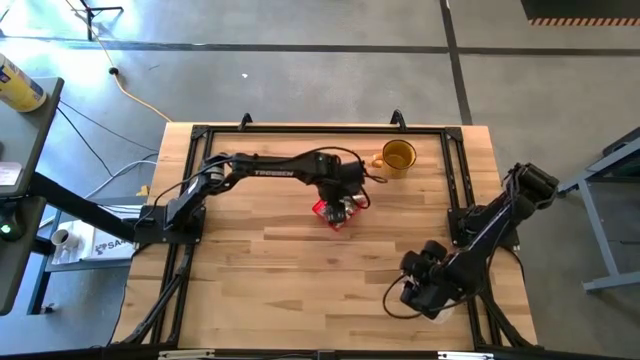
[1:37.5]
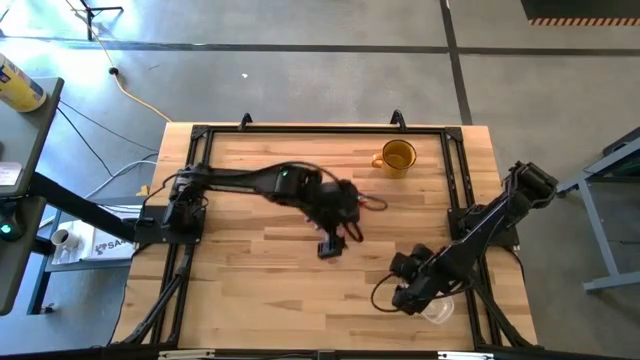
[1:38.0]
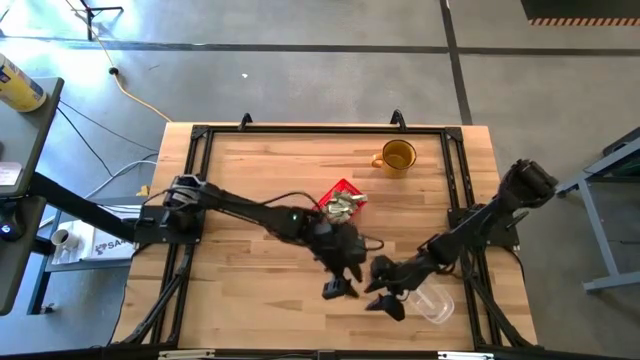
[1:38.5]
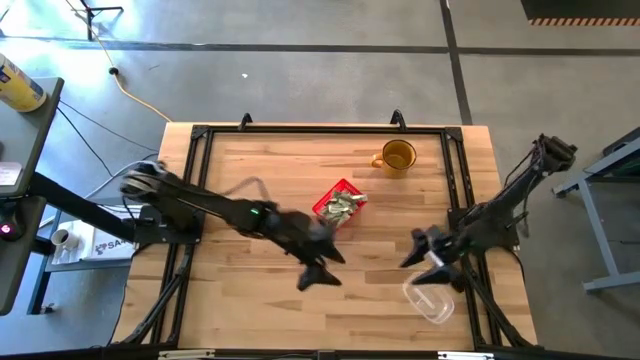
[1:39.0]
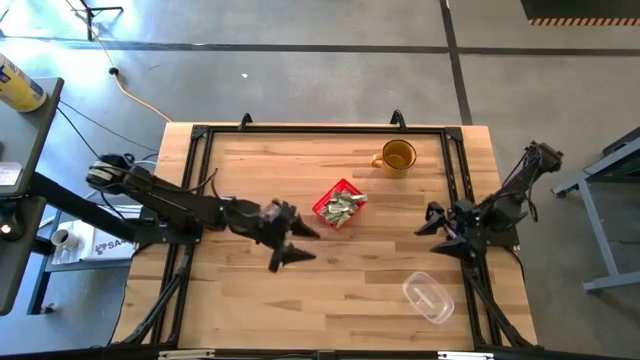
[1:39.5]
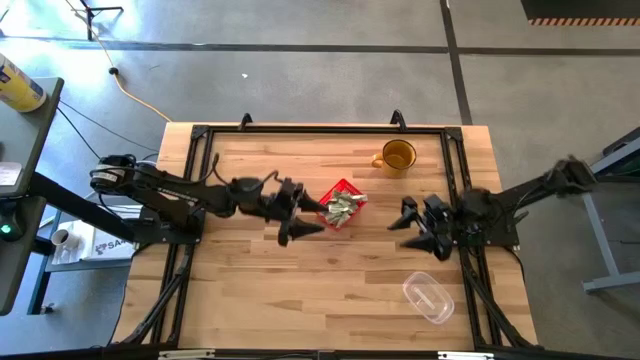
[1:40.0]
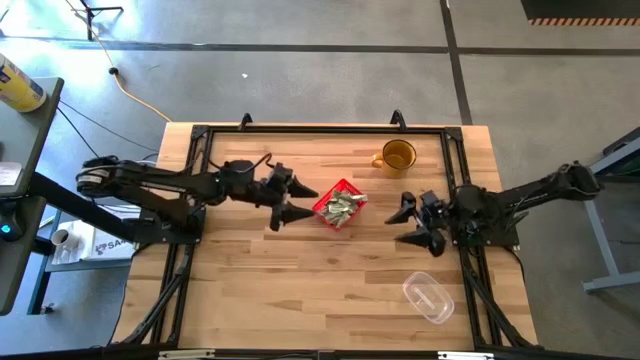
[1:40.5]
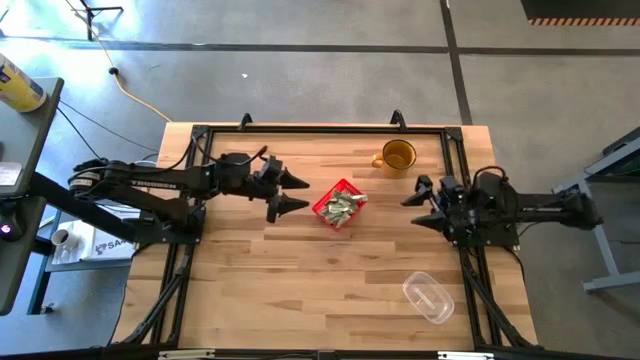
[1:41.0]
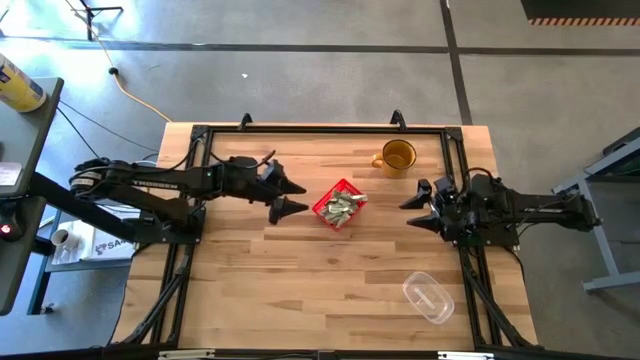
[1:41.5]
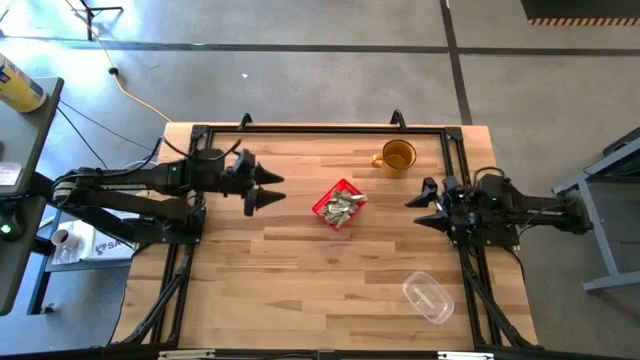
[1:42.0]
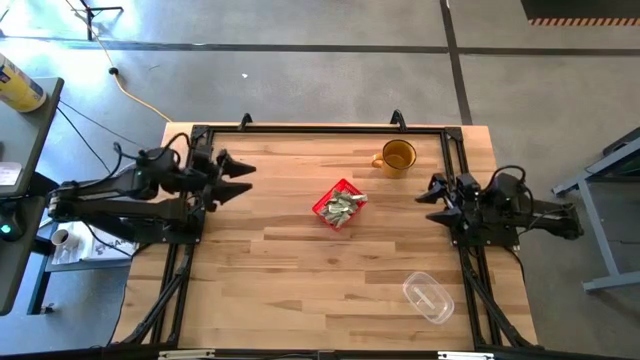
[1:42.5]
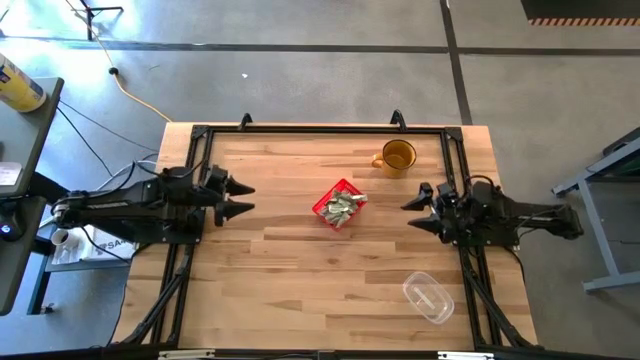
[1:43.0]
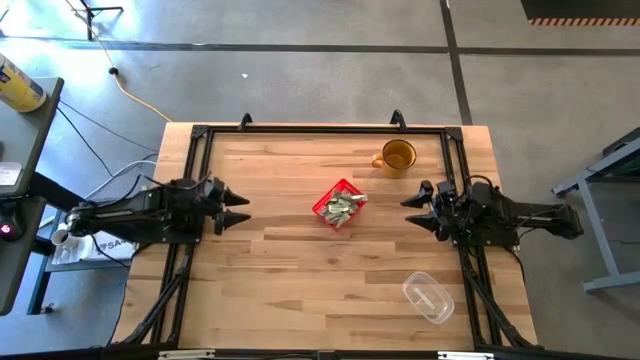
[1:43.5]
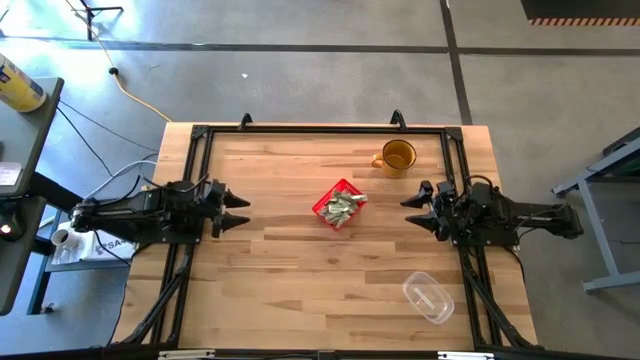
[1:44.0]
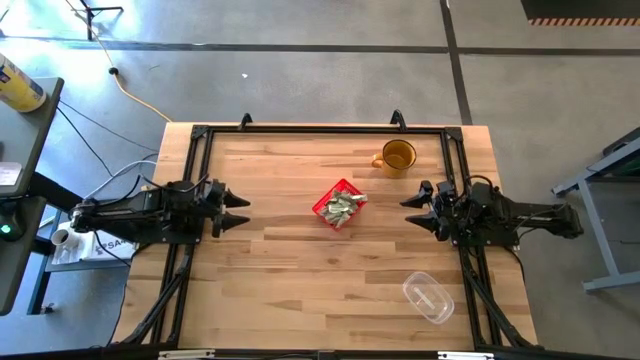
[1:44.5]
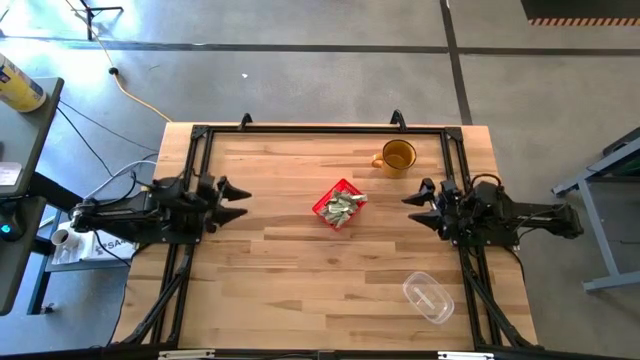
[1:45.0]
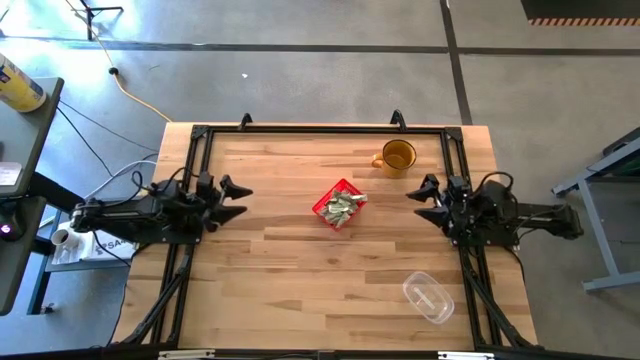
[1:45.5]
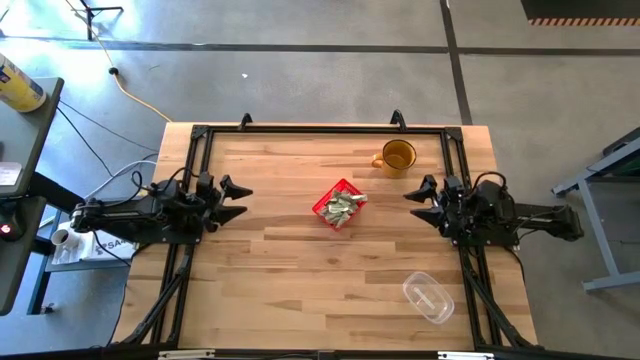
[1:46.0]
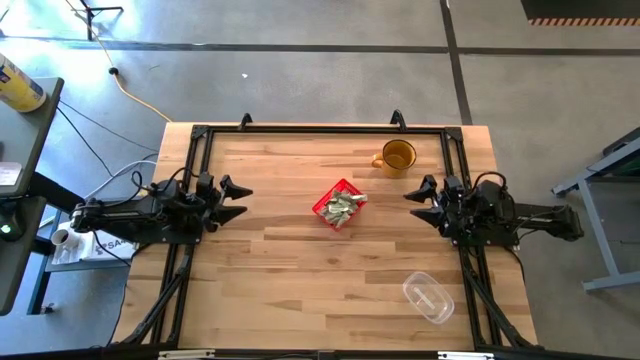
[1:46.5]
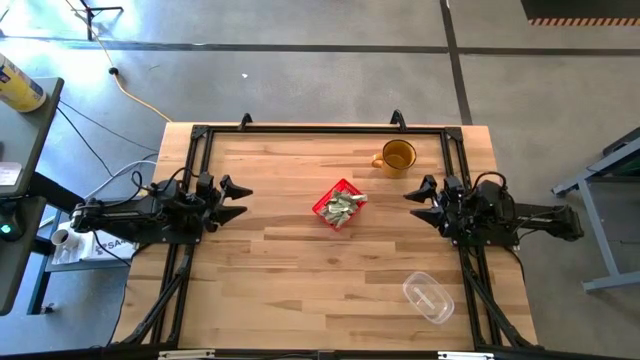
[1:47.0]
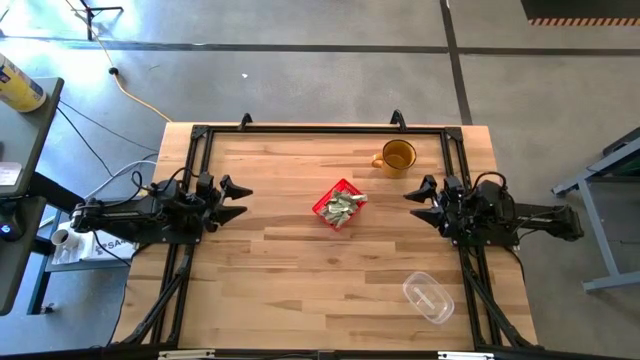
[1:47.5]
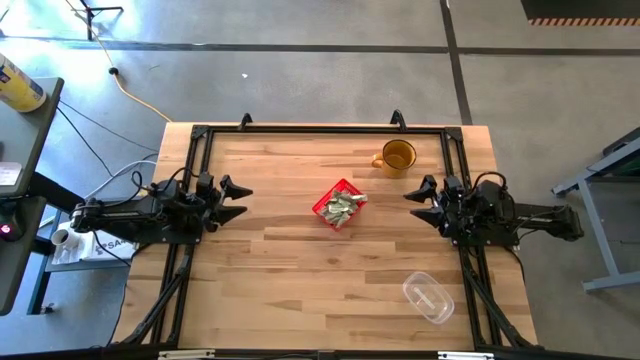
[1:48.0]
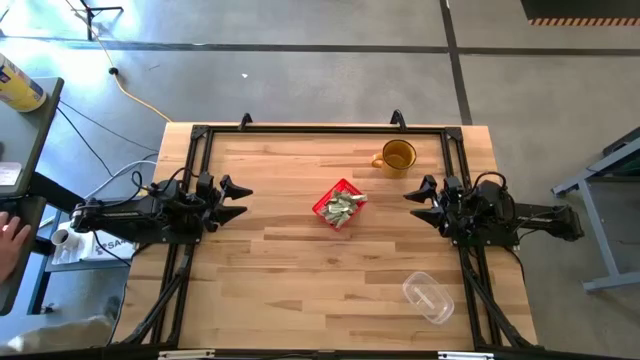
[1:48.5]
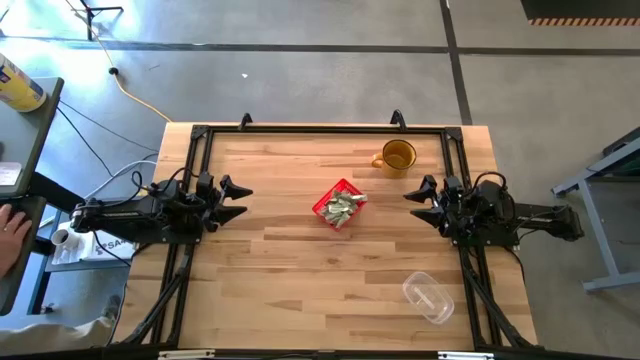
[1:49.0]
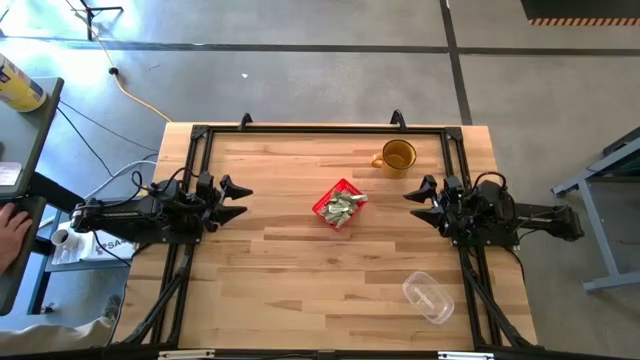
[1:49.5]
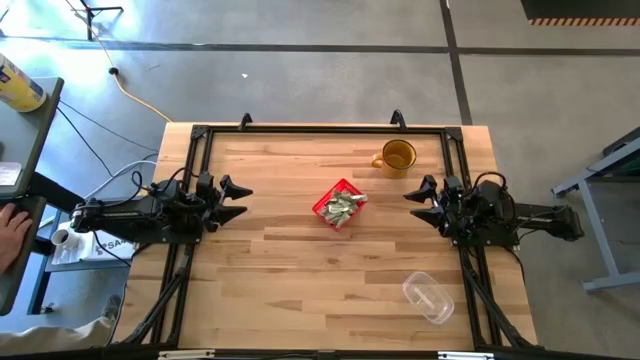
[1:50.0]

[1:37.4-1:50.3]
Task: Pick and place items into bin
Return to Home Position

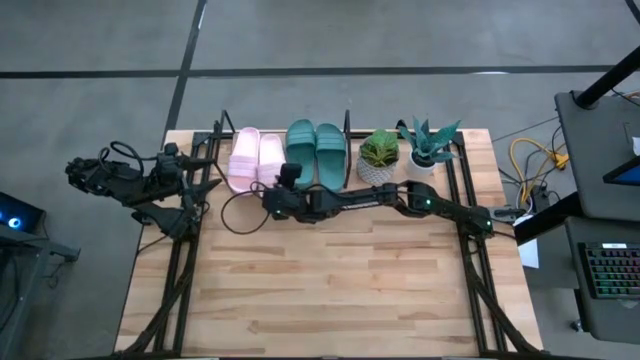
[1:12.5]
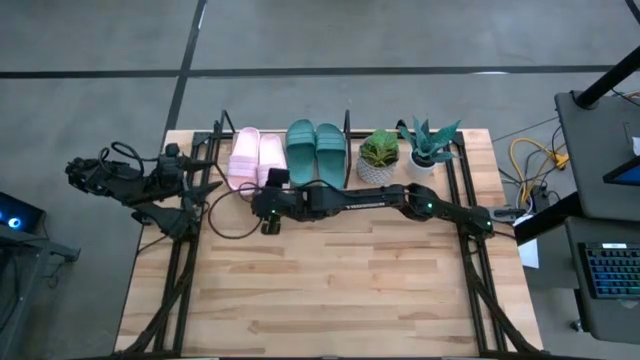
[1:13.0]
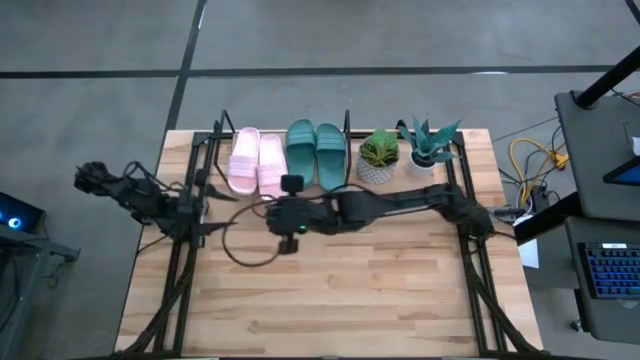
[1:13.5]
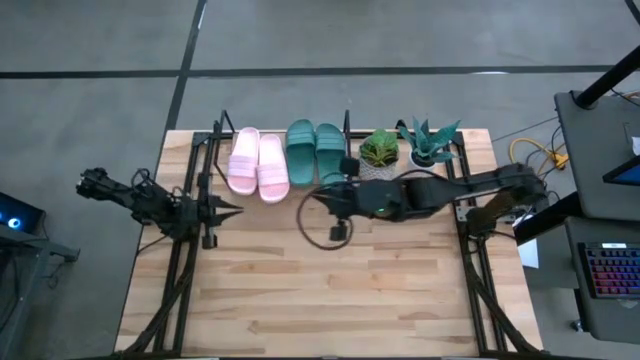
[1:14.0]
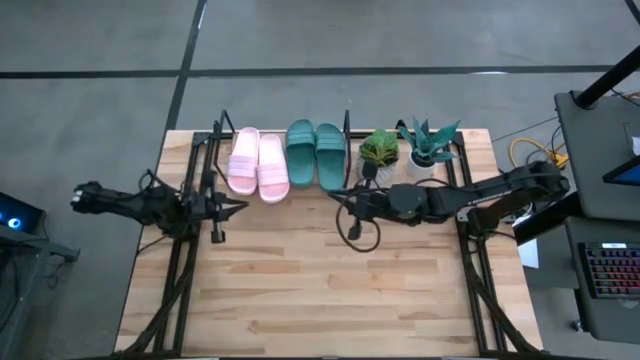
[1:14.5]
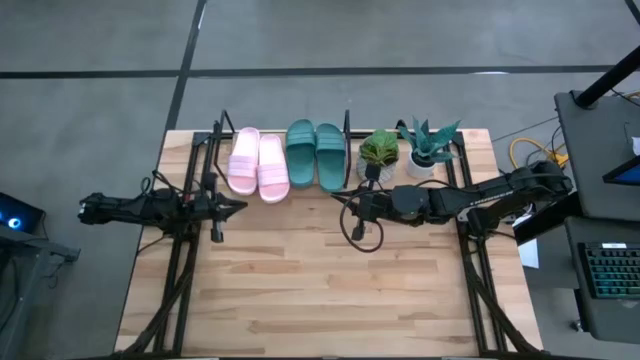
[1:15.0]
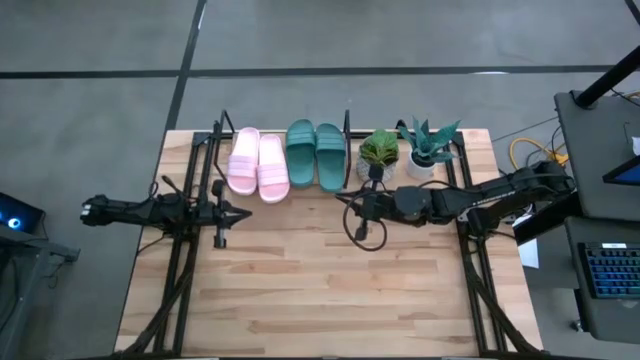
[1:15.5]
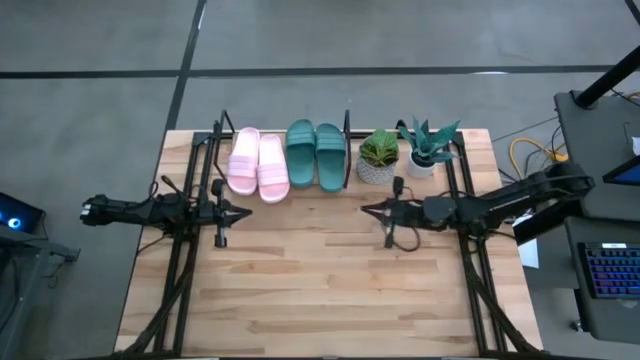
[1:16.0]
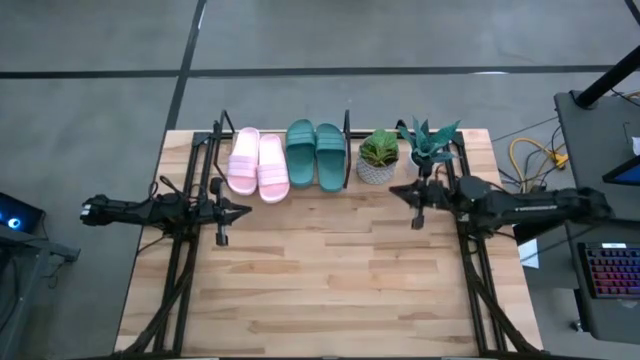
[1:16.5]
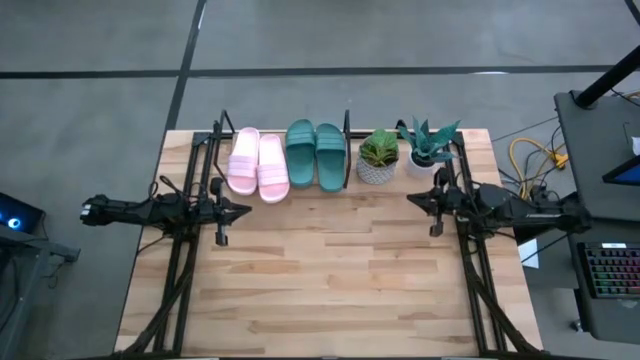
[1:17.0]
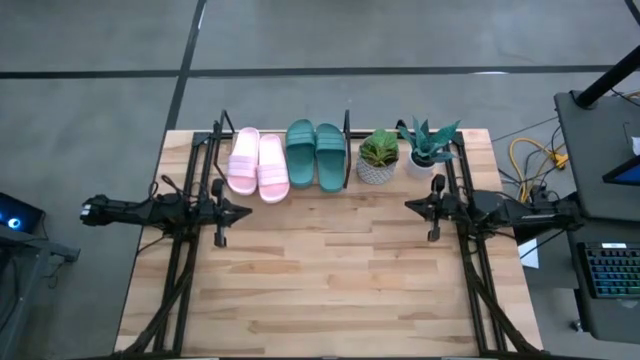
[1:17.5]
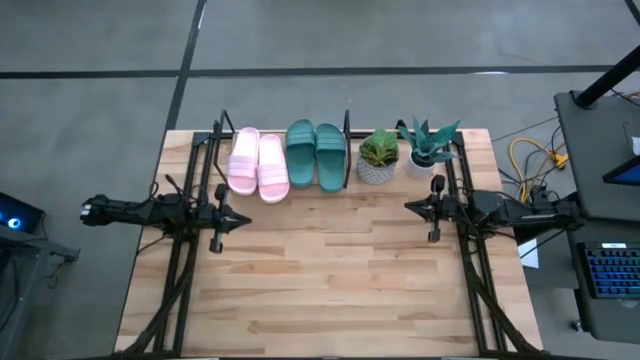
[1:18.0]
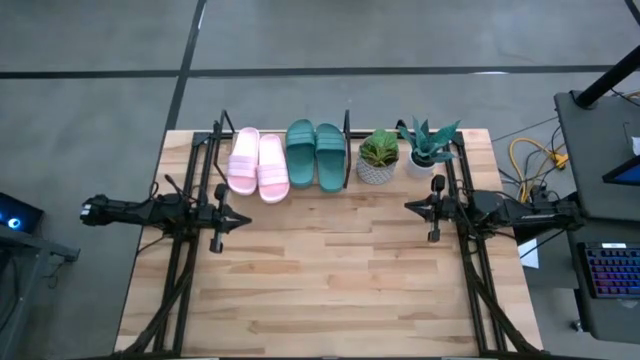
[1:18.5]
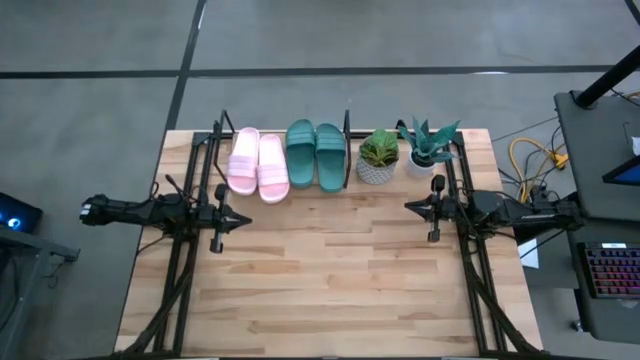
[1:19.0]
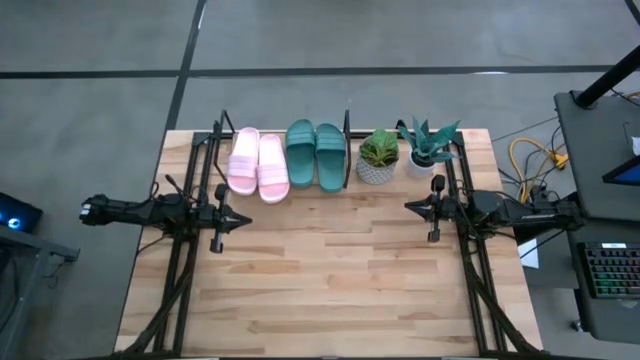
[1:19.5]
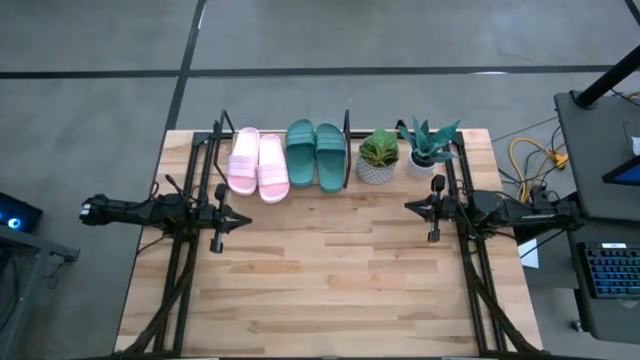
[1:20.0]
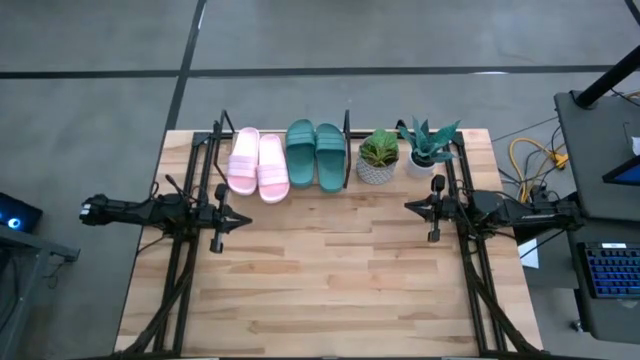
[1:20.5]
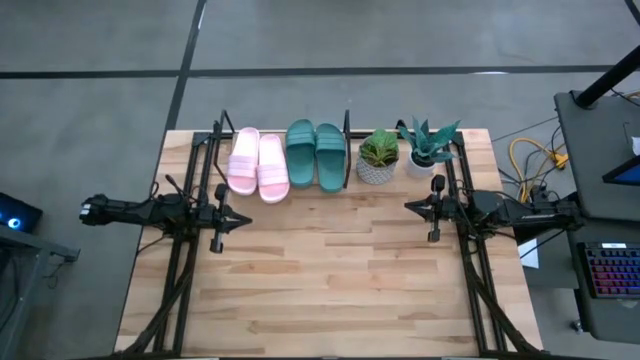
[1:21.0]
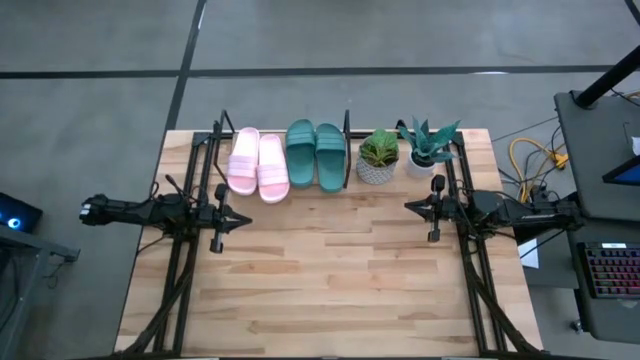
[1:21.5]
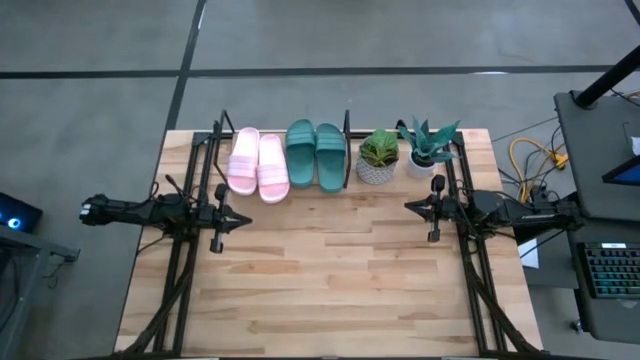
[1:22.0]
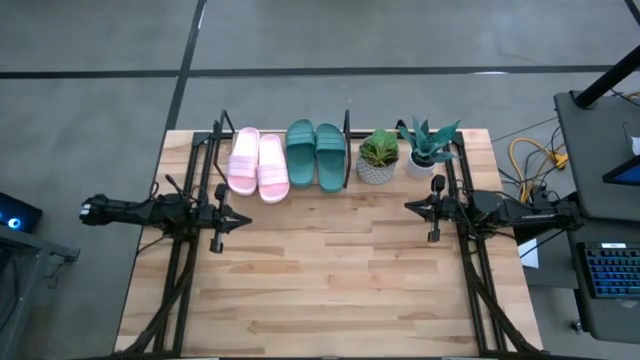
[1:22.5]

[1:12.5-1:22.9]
Task: Pick and place slides into the shelf
Return to Home Position
